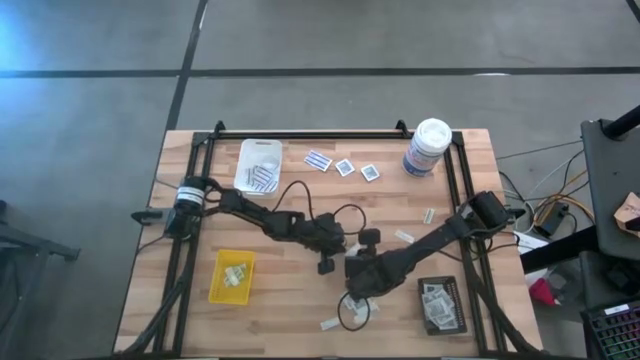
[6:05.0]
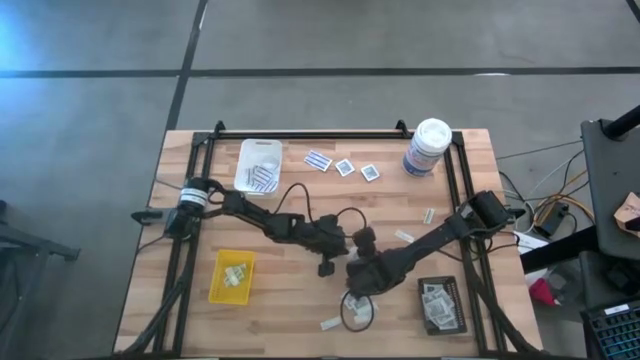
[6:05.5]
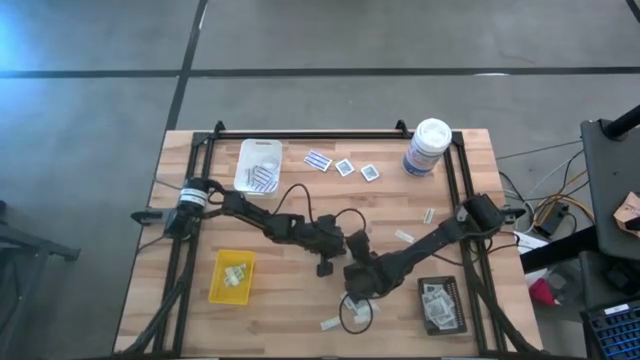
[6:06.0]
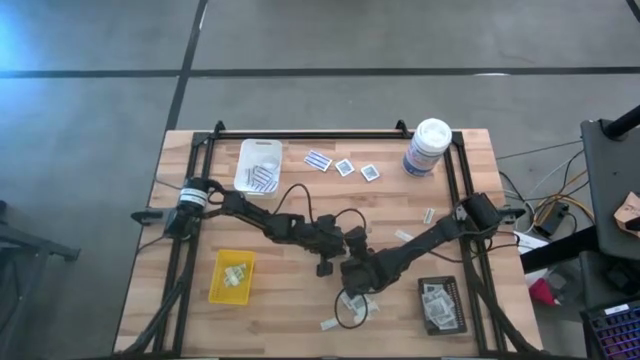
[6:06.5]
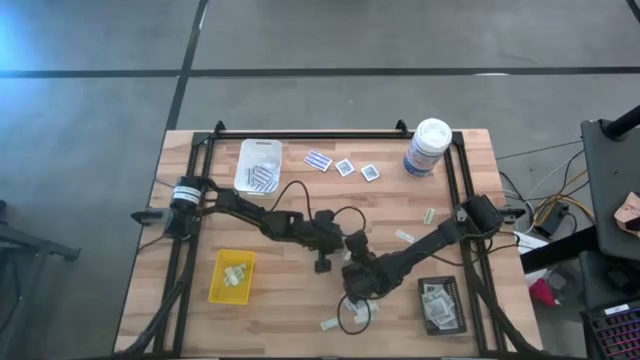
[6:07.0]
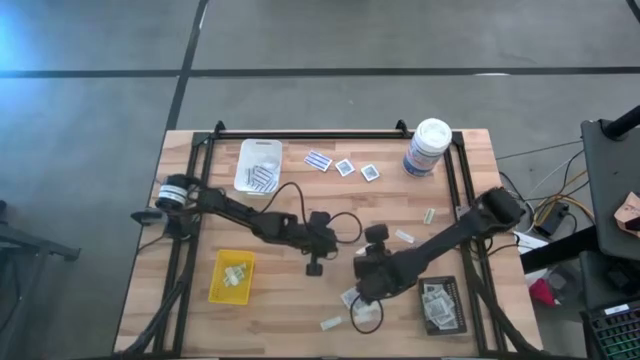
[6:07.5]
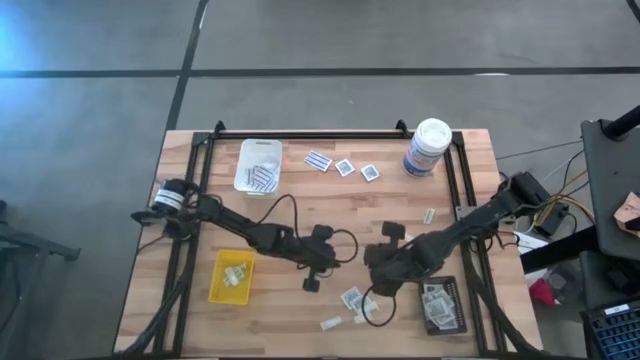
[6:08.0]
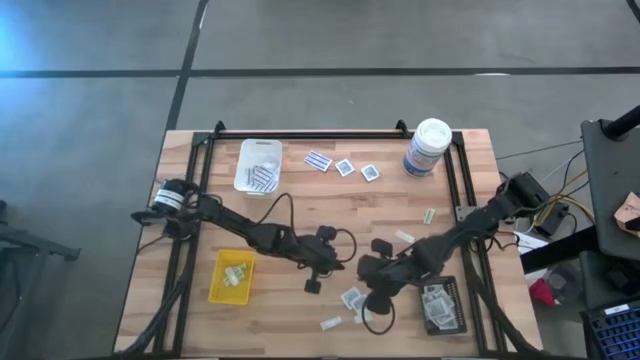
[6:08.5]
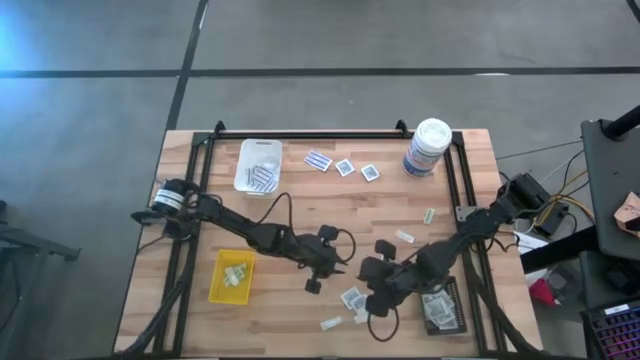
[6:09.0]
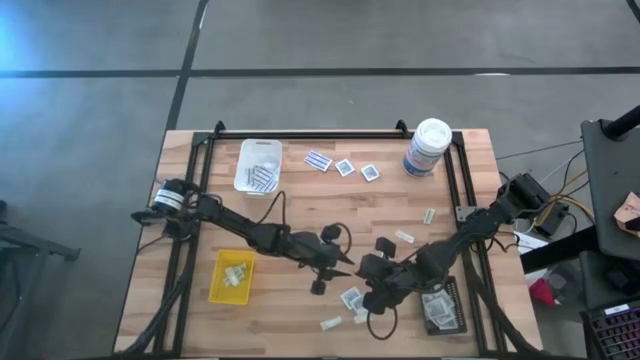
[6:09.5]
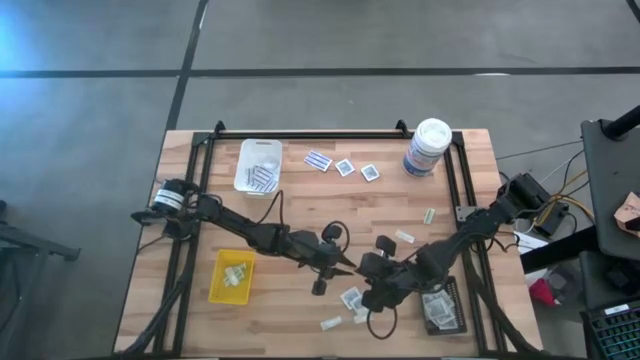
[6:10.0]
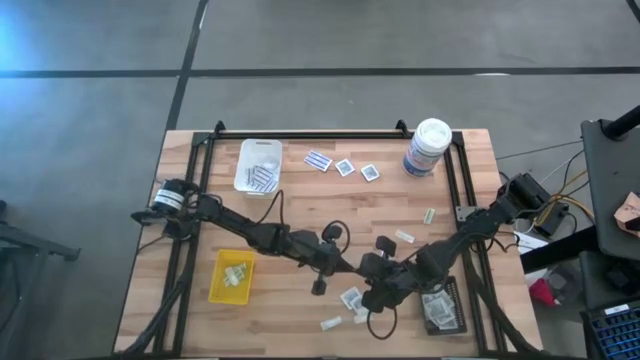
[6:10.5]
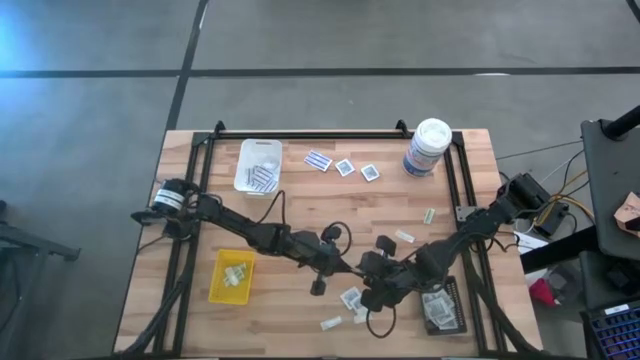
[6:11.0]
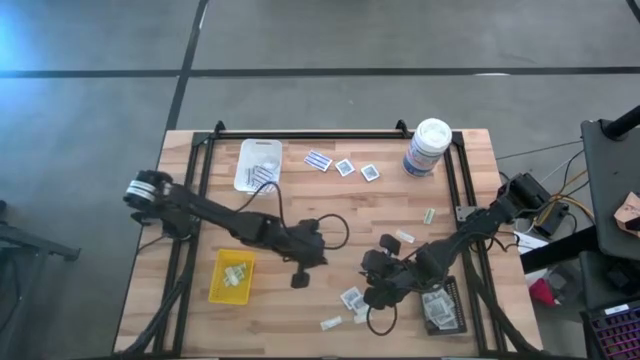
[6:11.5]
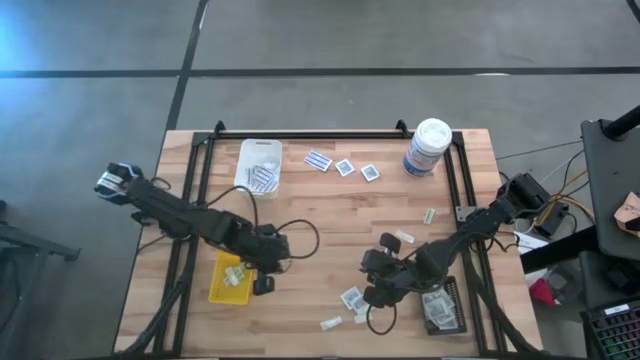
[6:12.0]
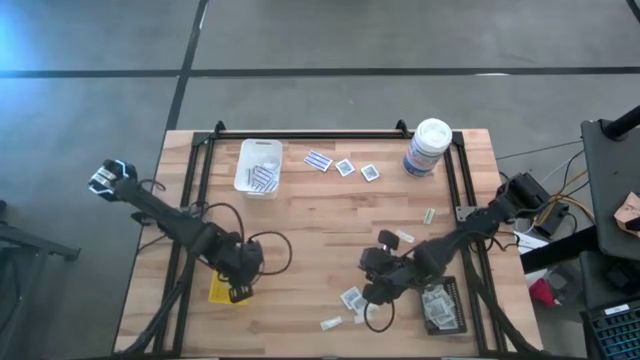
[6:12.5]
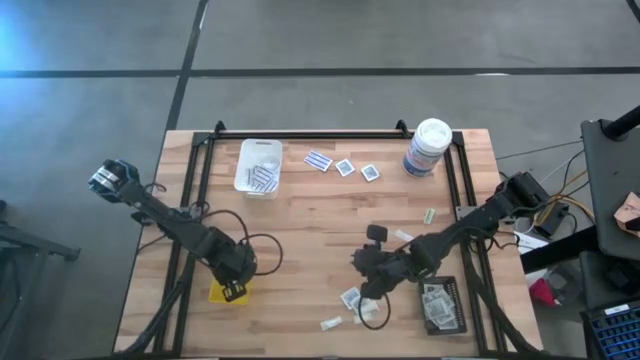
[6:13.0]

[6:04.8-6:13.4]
Task: Pick & Place First Aid Supplies
Put the green bandage into the yellow bin

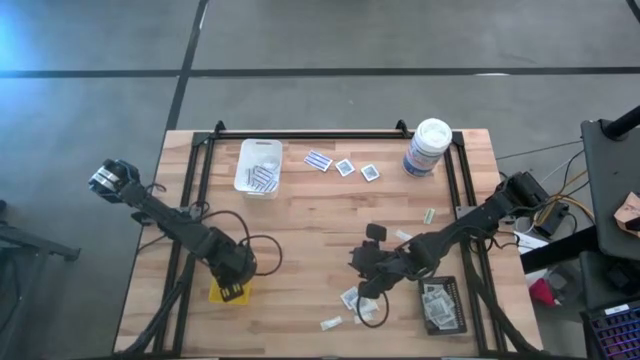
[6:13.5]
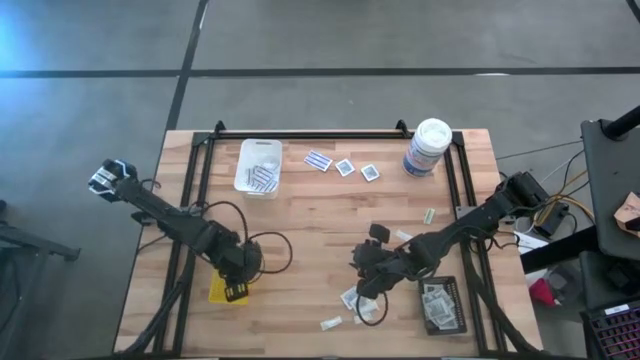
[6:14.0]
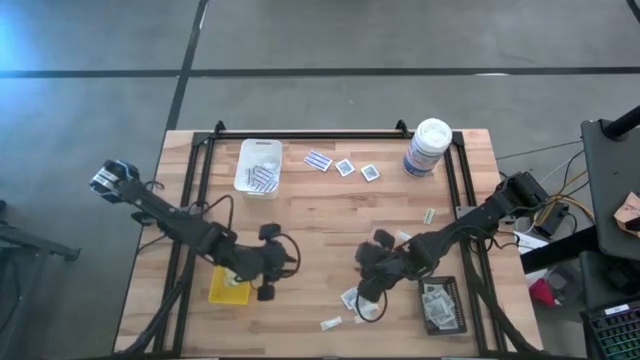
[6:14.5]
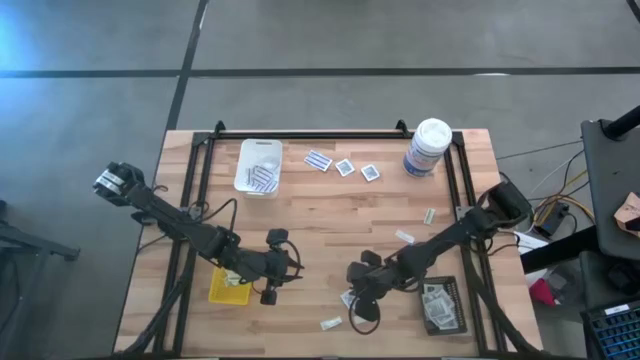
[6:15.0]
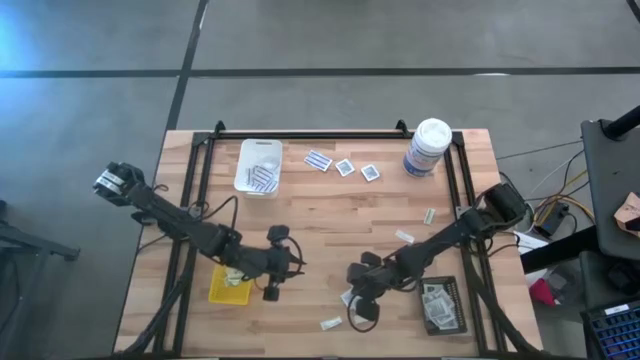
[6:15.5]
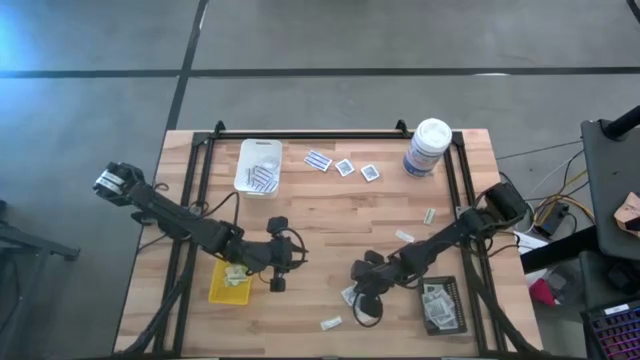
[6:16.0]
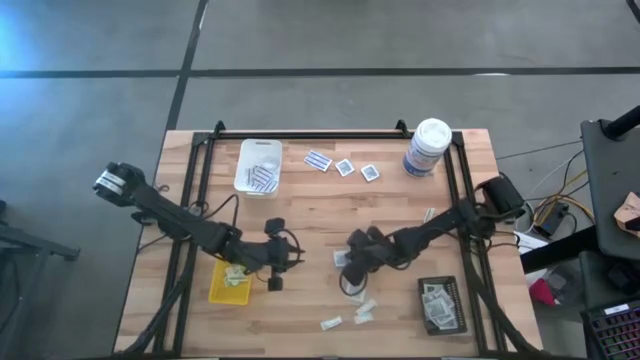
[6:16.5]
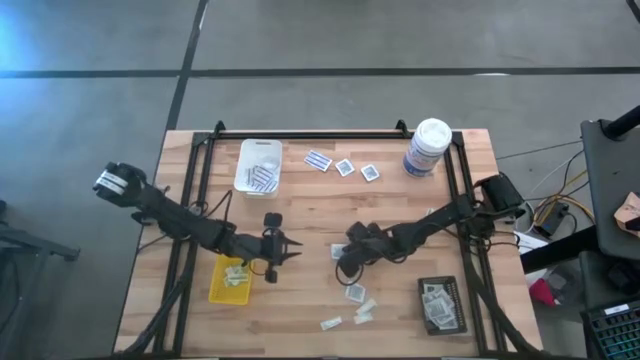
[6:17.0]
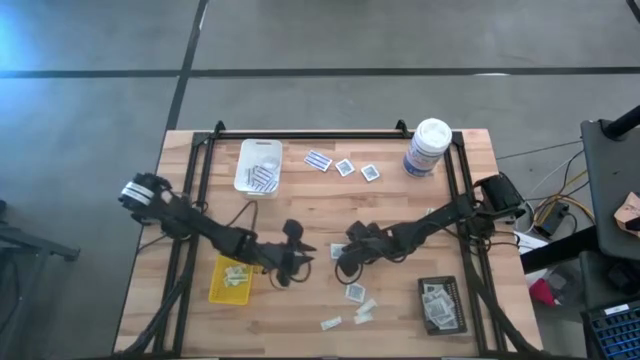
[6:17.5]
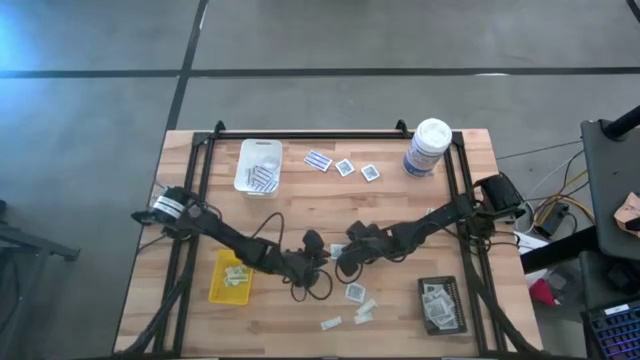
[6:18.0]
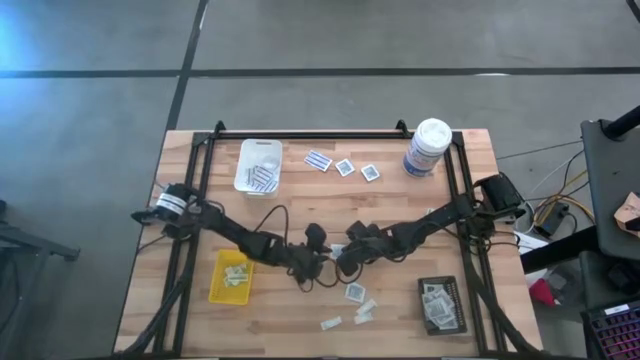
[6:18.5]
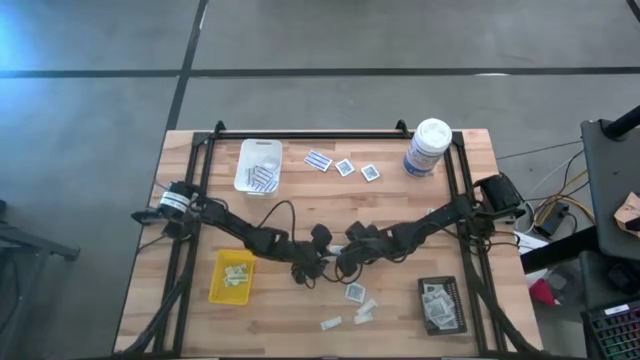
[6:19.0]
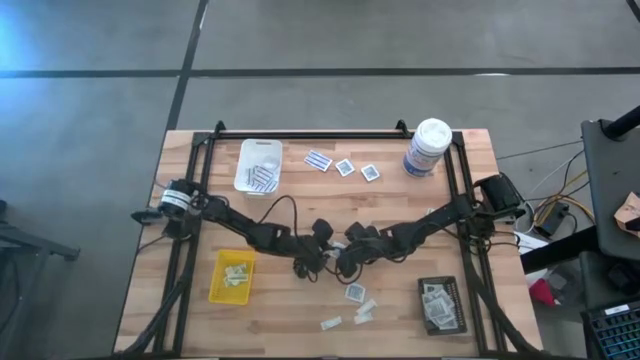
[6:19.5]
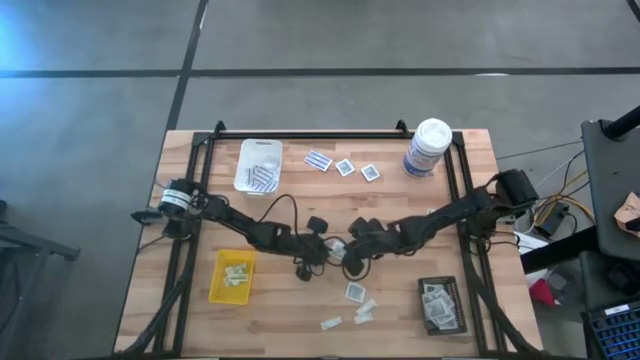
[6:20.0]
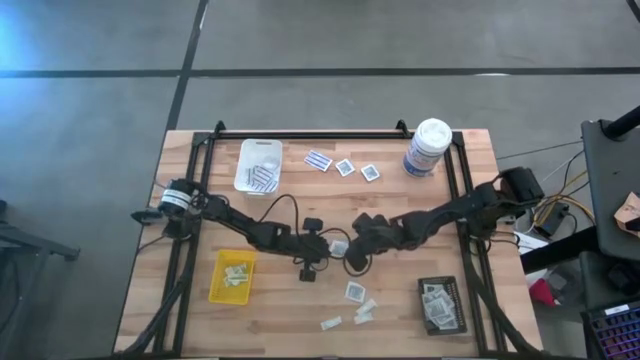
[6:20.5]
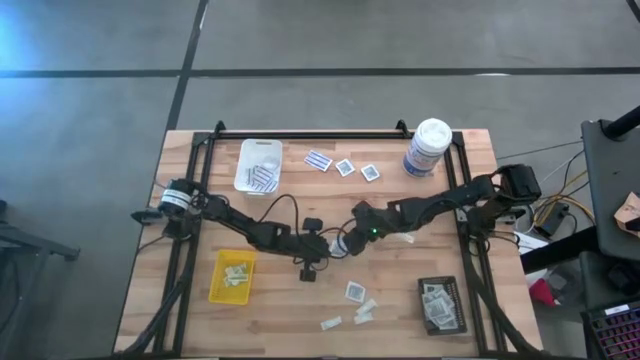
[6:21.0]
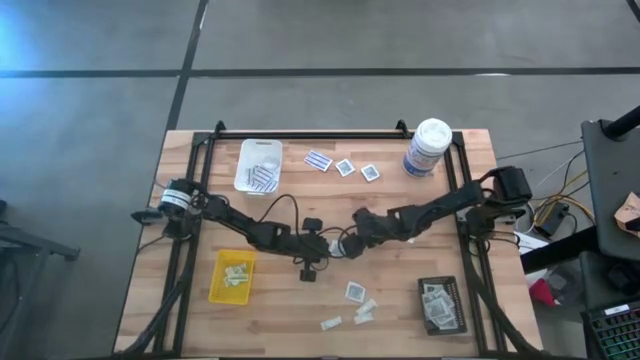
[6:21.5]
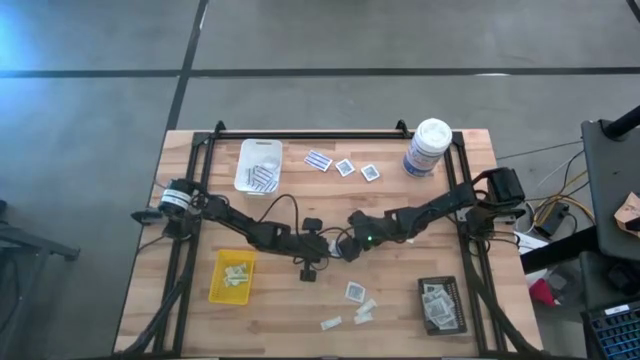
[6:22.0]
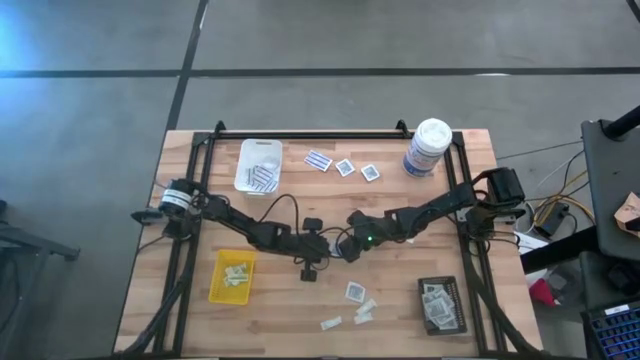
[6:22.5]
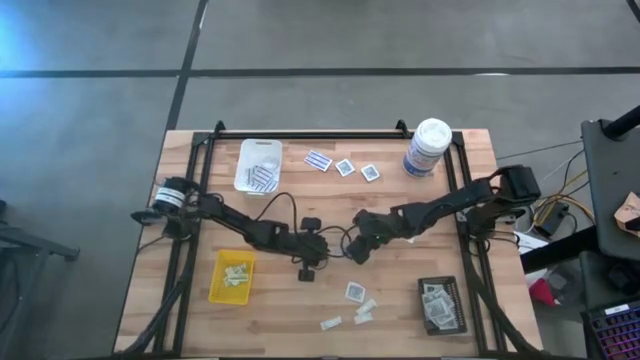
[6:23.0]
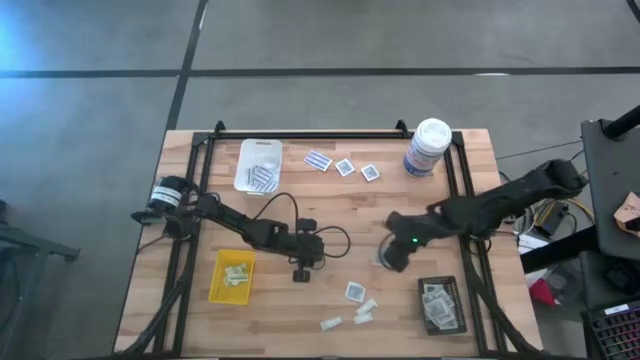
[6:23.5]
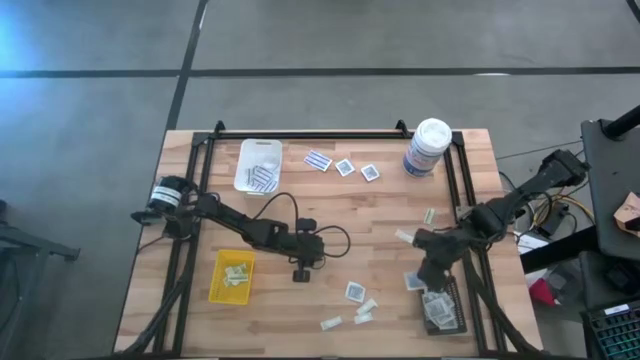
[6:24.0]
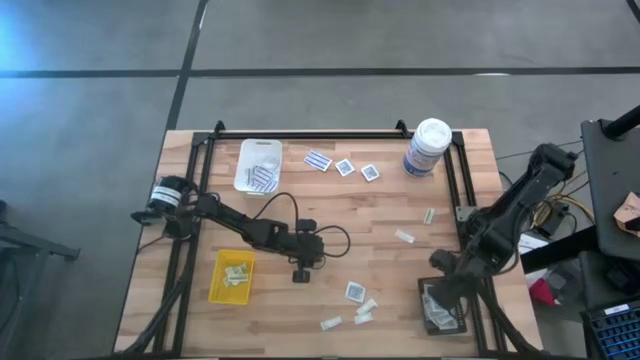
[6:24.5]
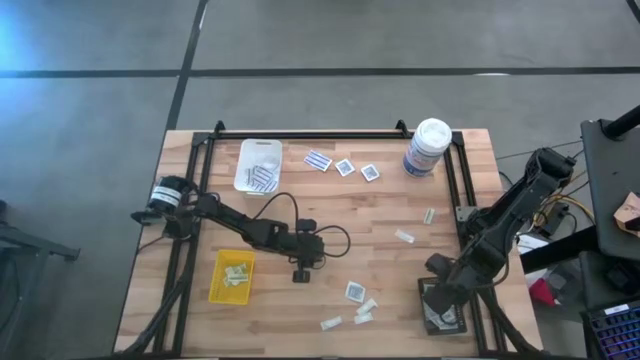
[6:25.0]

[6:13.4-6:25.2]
Put the towelette pack into the black bin

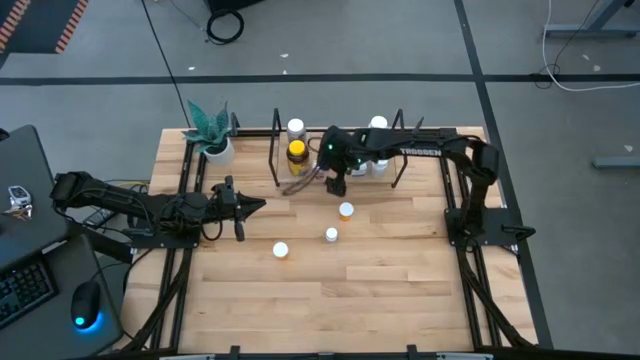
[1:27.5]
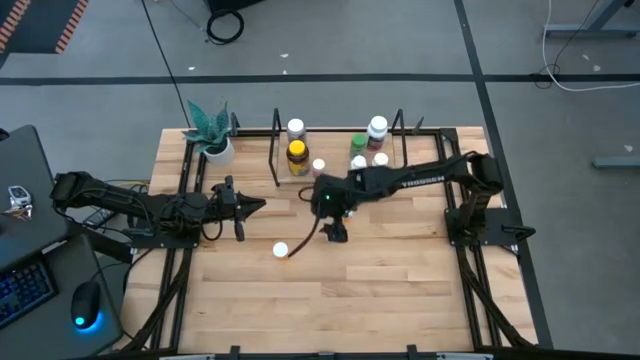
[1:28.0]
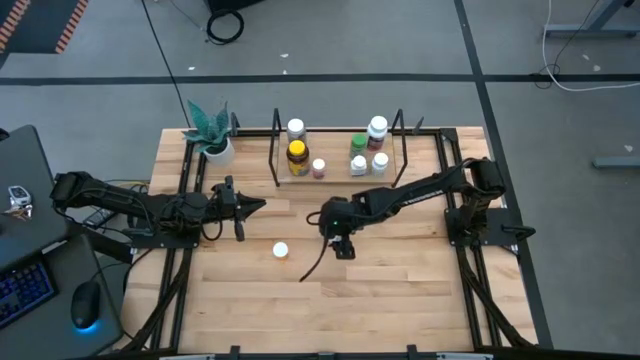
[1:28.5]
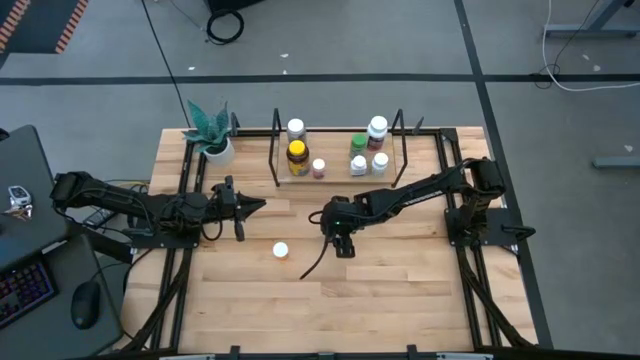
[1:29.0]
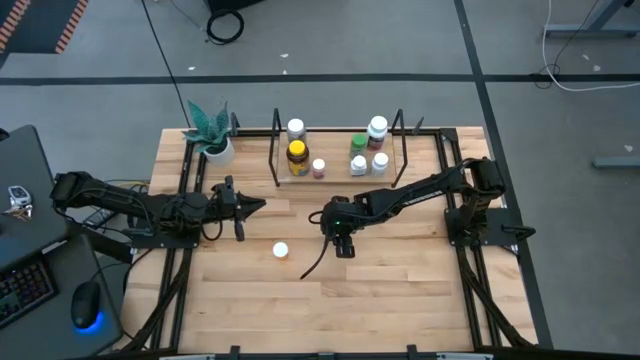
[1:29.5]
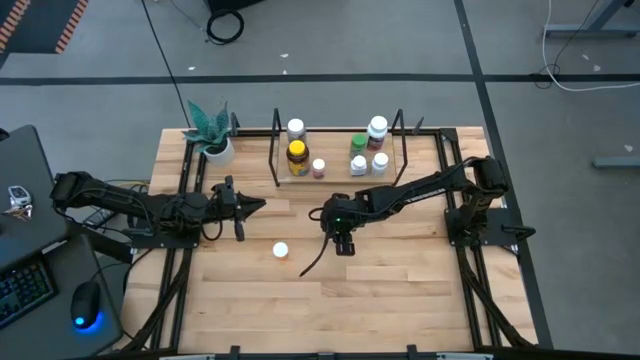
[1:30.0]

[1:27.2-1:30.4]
Task: Pick and place medicine bottles onto shelf by color
Put the white medicine bottle on the shelf
